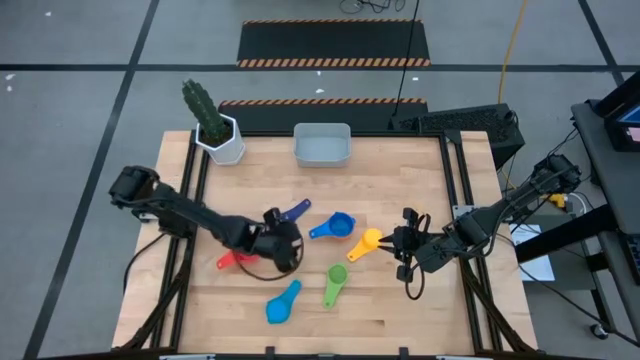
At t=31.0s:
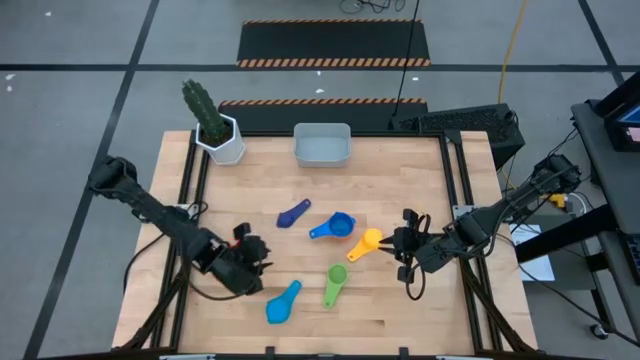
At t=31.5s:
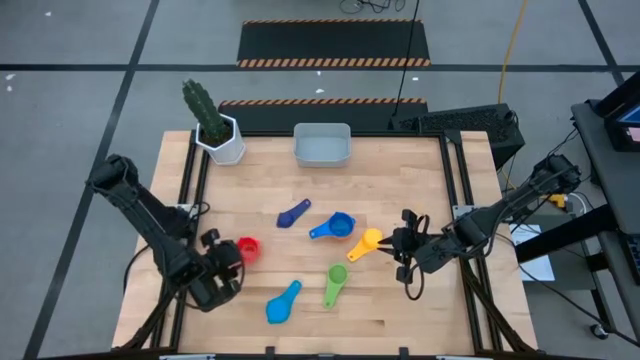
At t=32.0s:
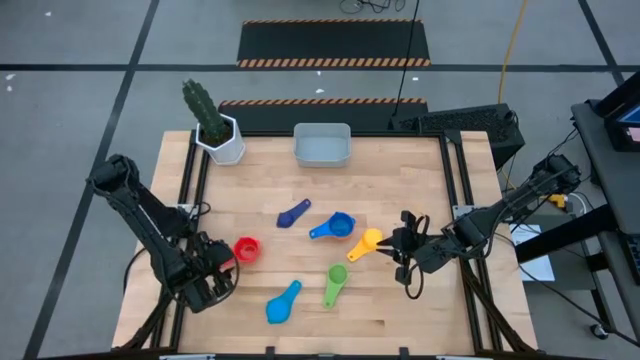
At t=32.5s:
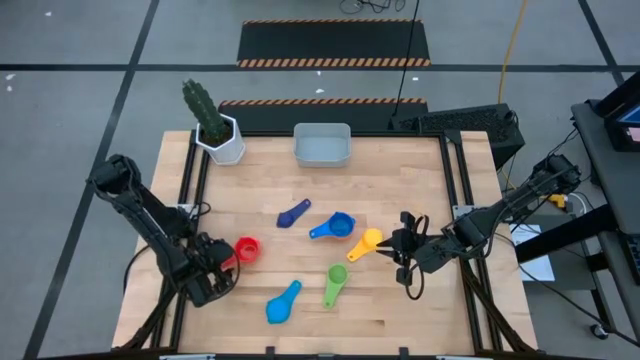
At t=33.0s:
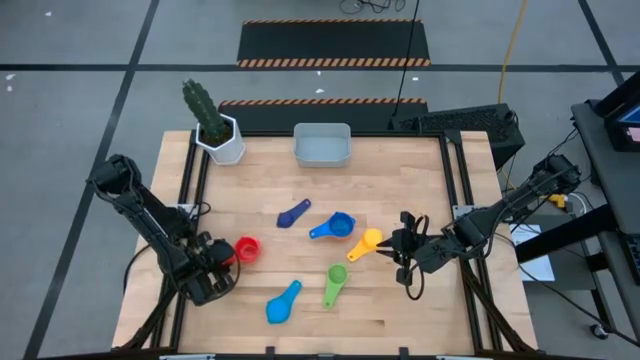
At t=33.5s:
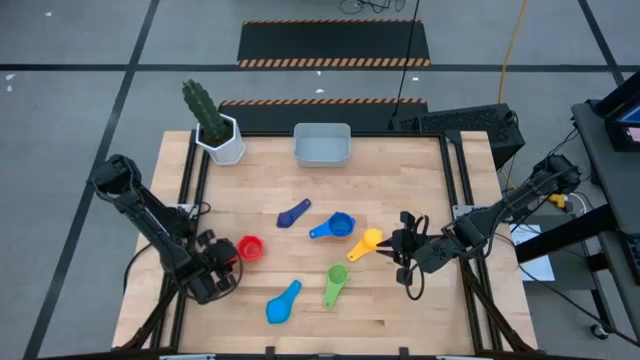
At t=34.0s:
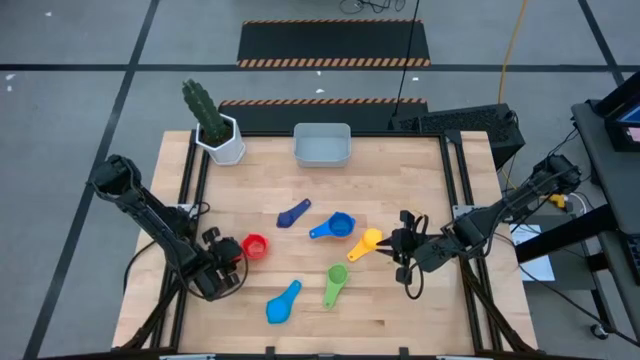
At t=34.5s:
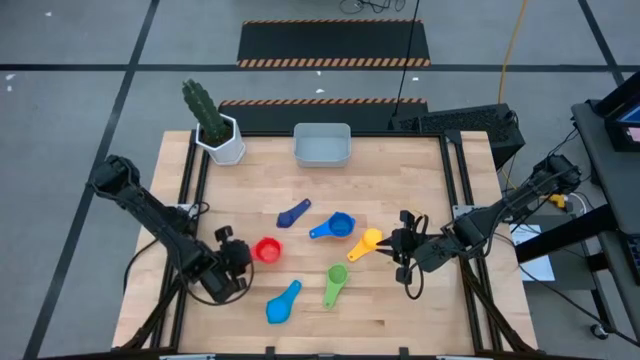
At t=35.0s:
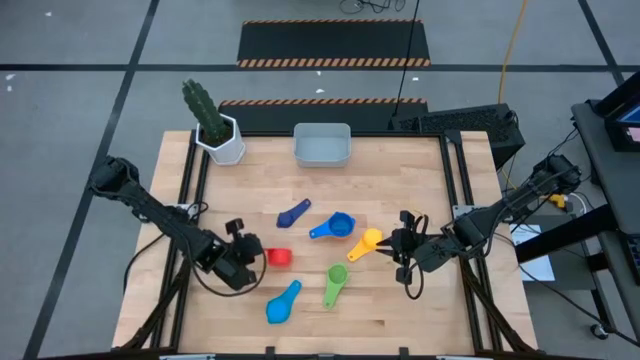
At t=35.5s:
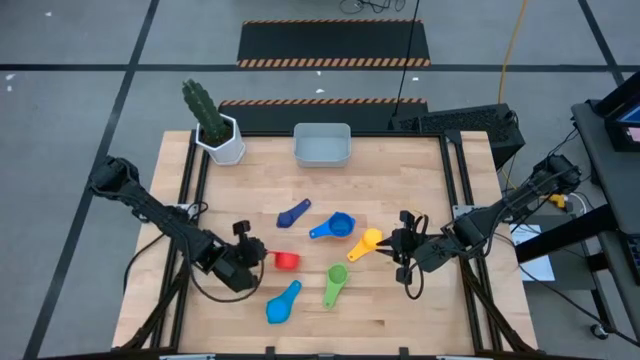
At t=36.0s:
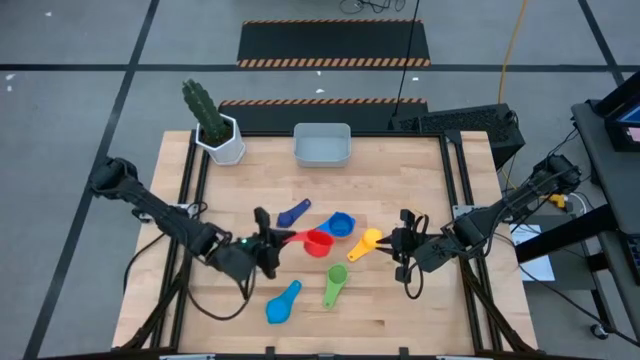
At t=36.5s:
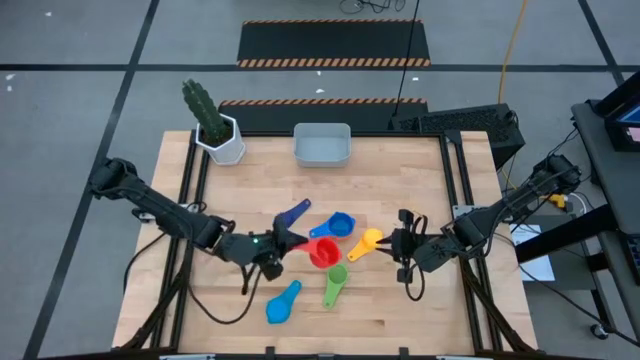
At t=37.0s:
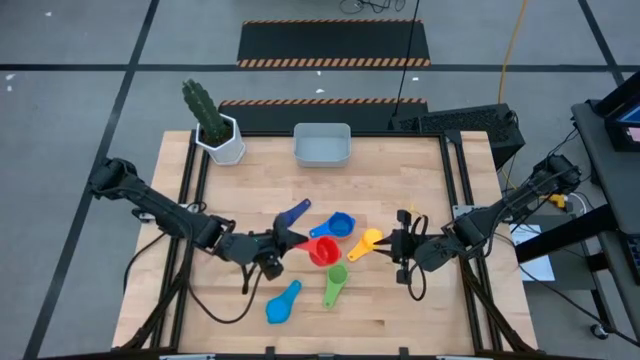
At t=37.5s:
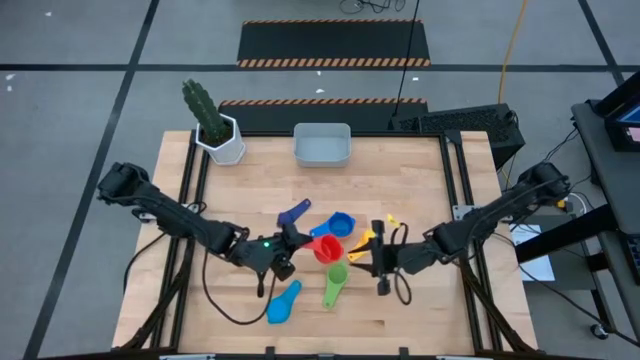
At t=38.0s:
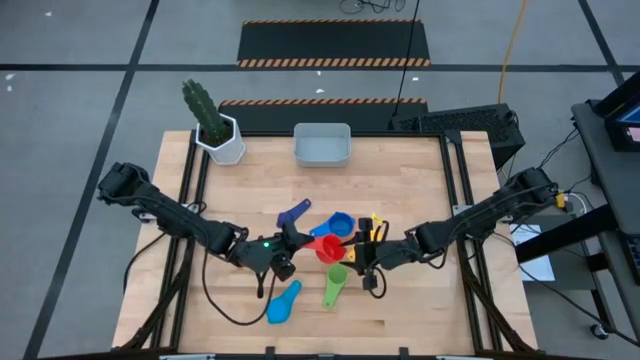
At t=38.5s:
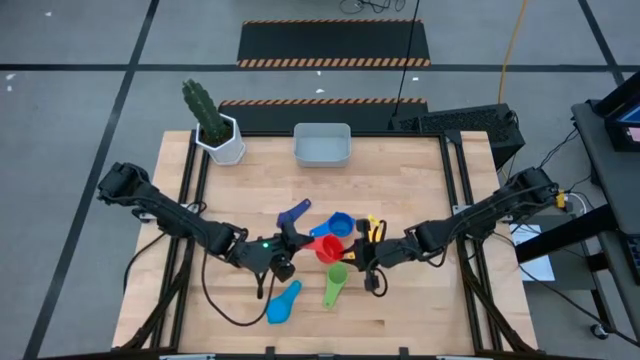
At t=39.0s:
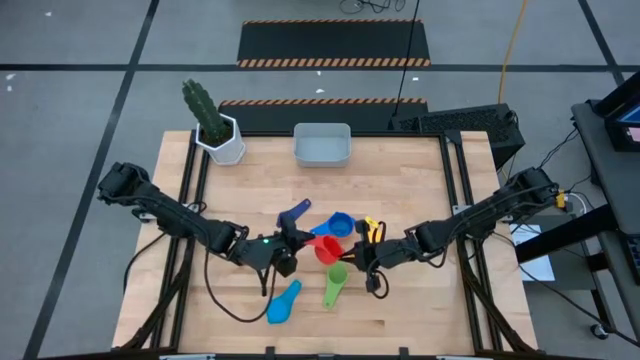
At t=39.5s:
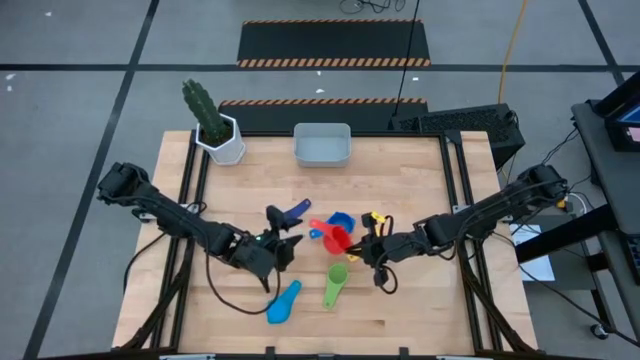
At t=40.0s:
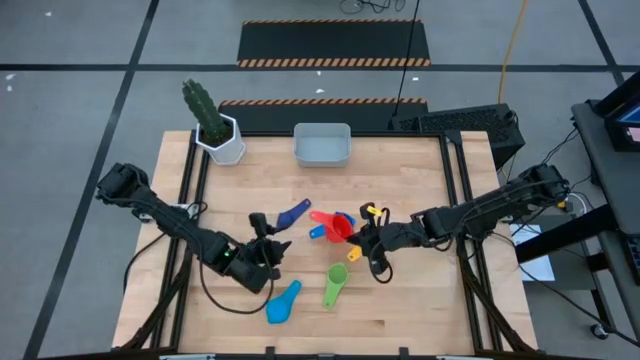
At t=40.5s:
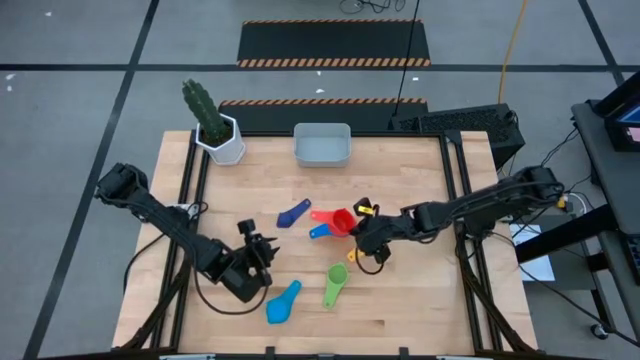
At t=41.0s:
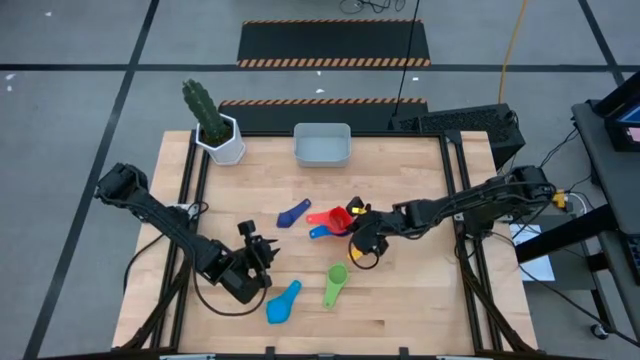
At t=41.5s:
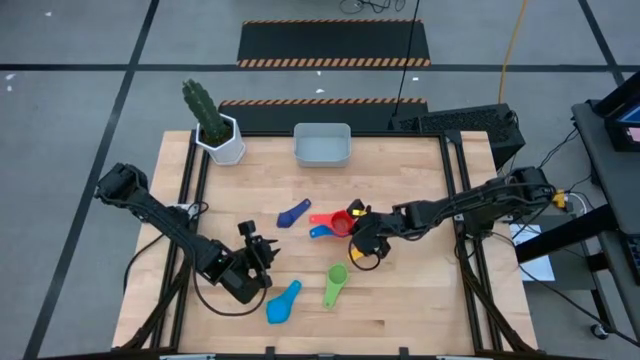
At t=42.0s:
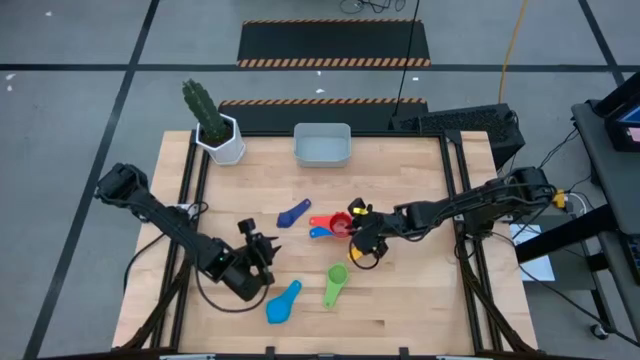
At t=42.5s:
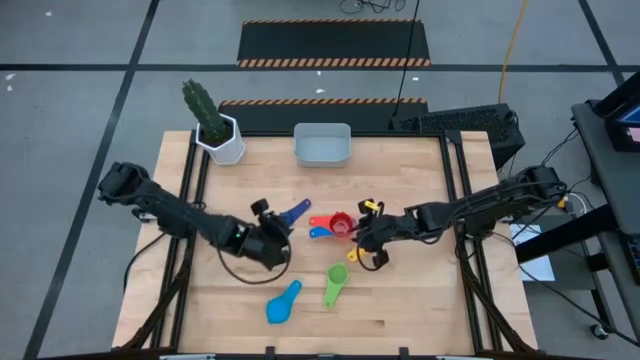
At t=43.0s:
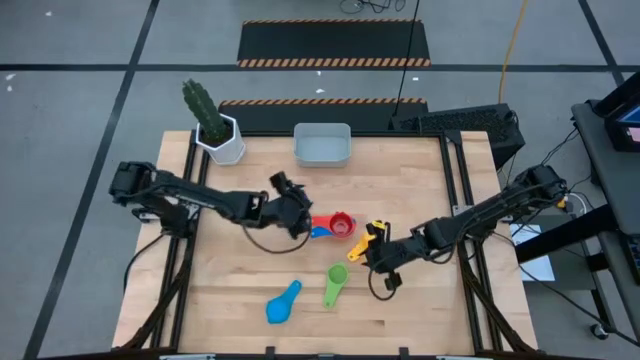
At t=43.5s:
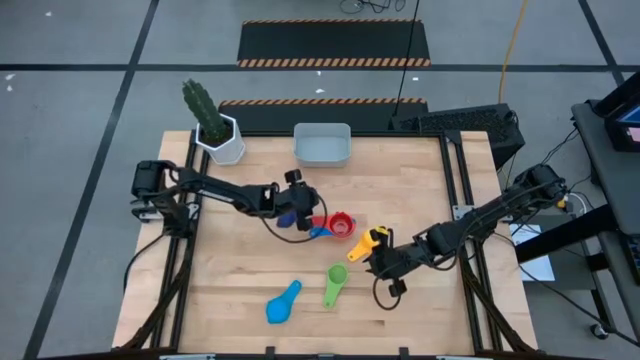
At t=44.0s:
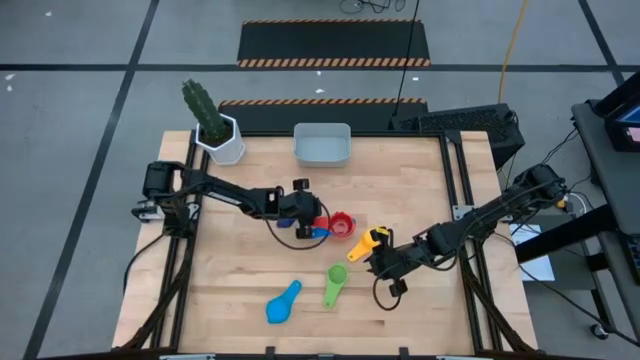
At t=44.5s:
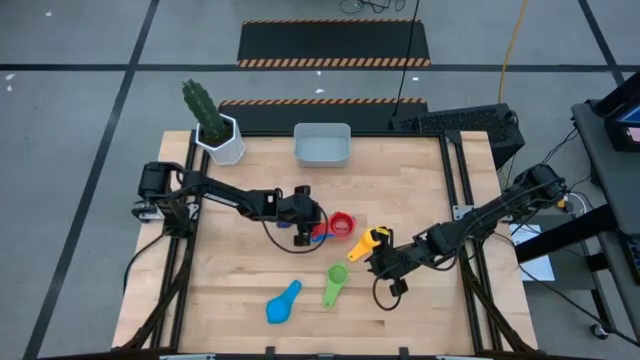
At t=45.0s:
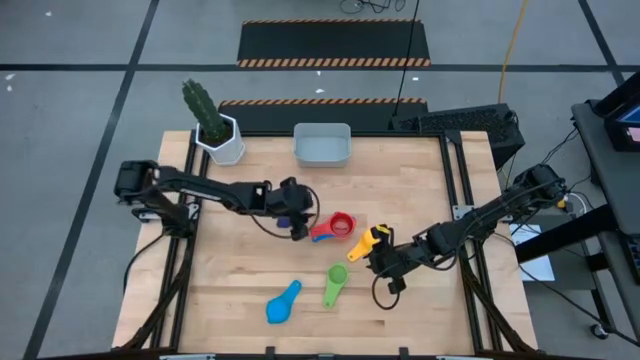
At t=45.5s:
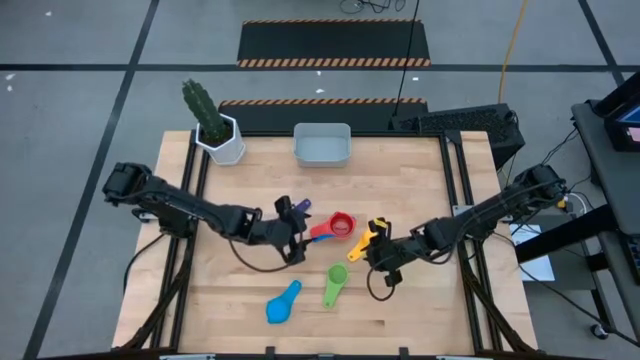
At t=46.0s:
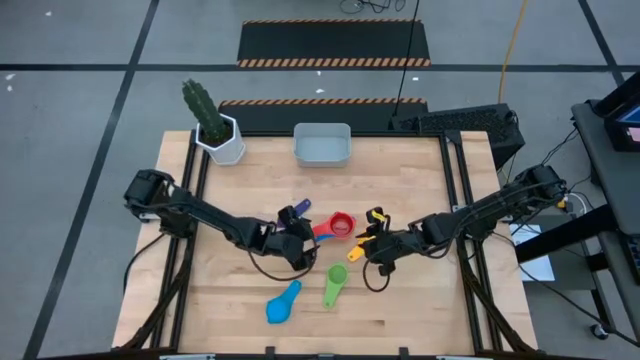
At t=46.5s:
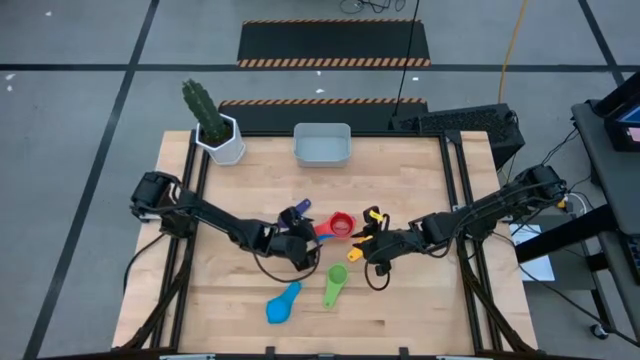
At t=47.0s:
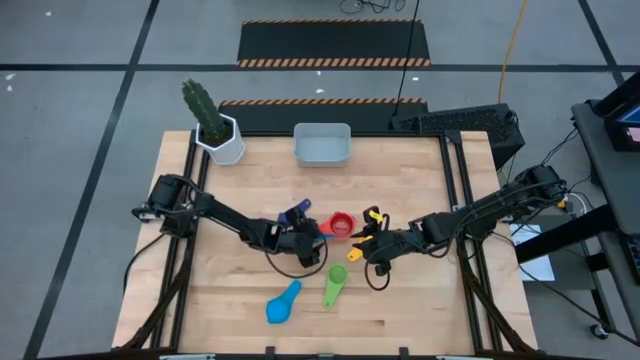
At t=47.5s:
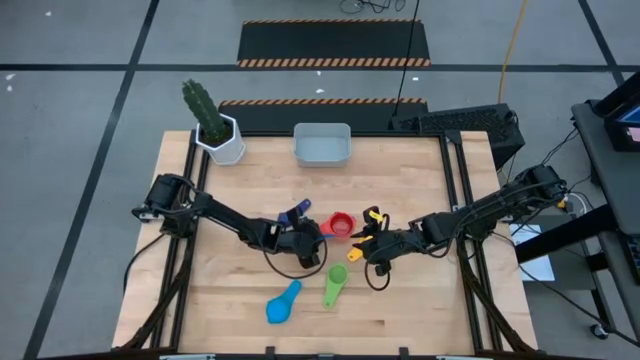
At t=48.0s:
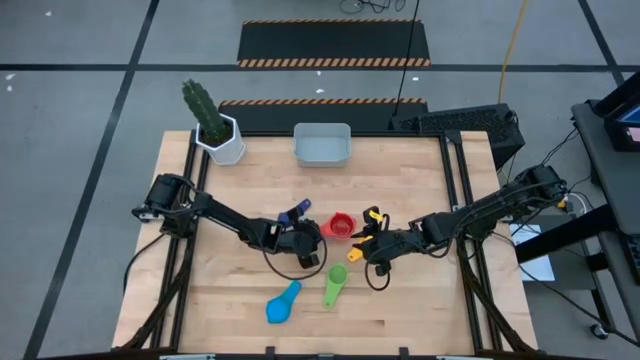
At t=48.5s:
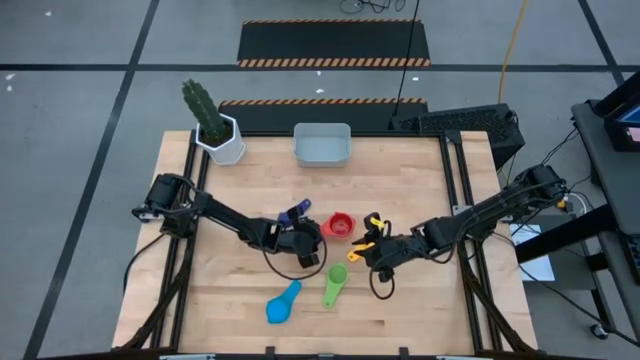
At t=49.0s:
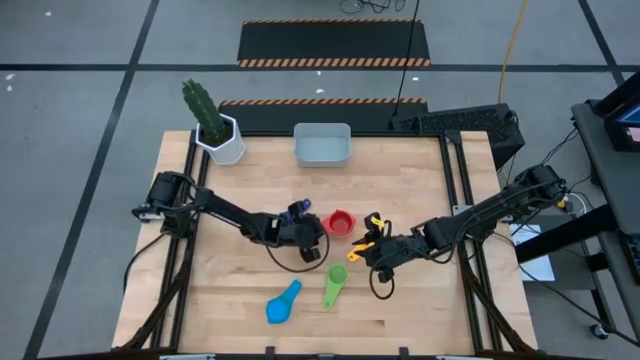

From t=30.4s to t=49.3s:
Task: Nest measuring cups in basket
Stack the red measuring cup on top of the blue measuring cup

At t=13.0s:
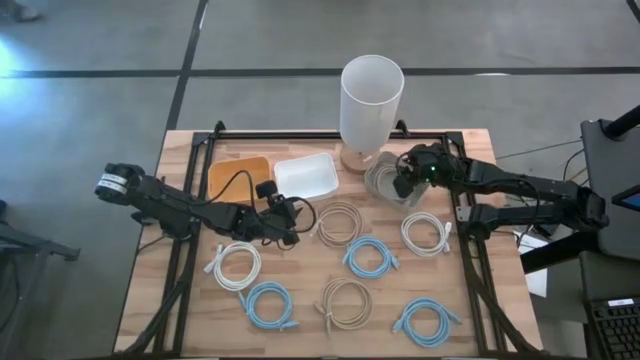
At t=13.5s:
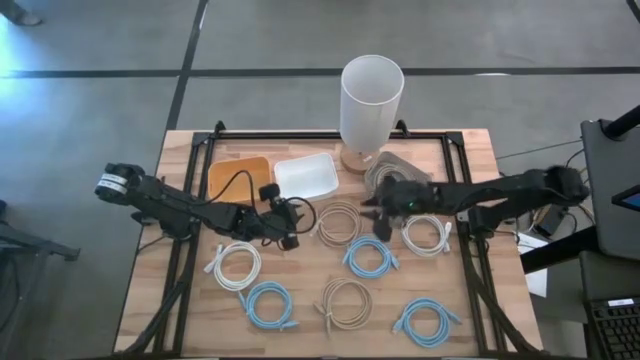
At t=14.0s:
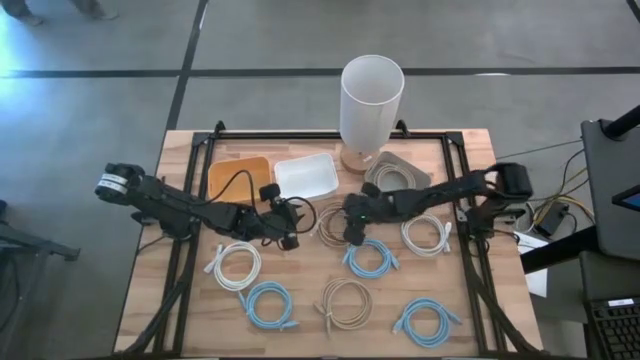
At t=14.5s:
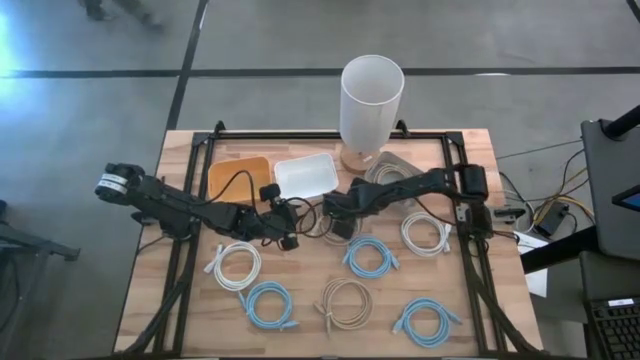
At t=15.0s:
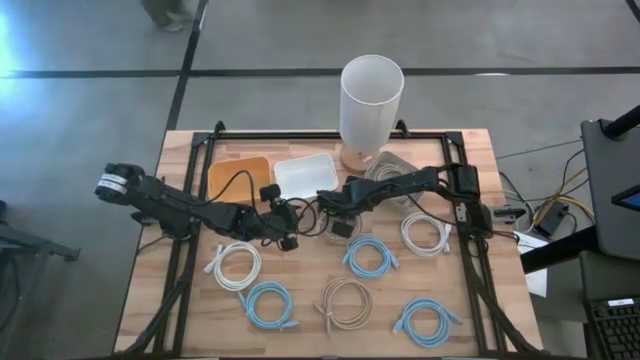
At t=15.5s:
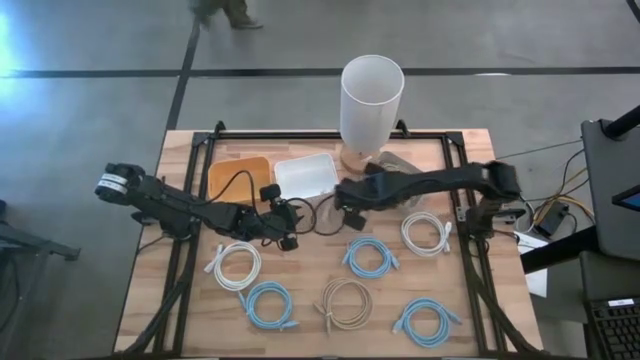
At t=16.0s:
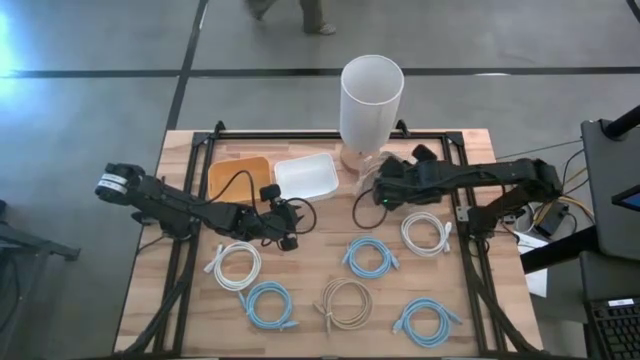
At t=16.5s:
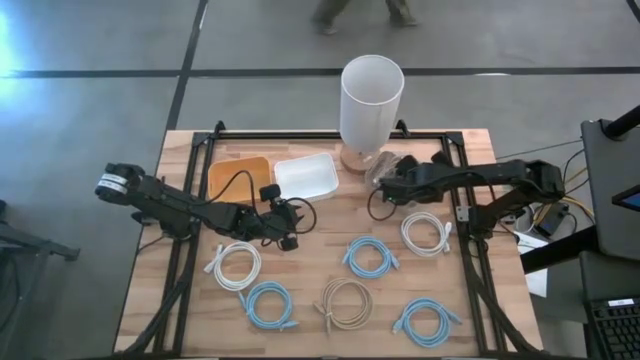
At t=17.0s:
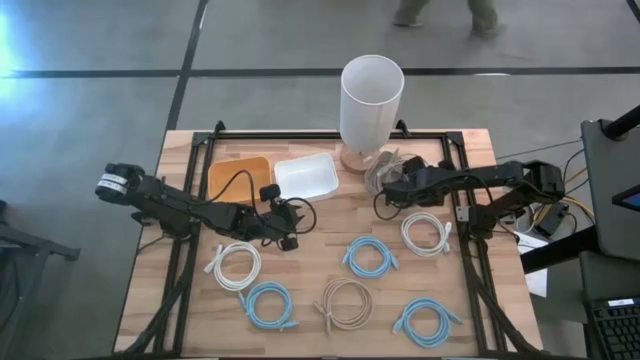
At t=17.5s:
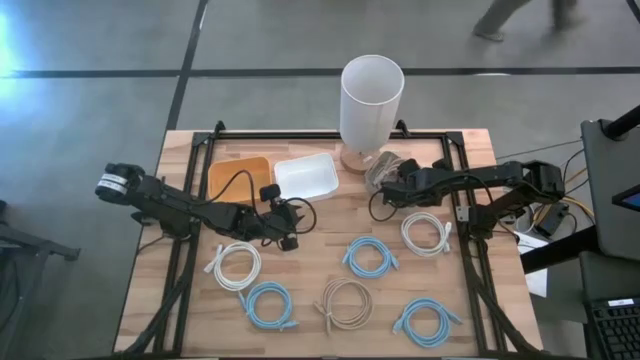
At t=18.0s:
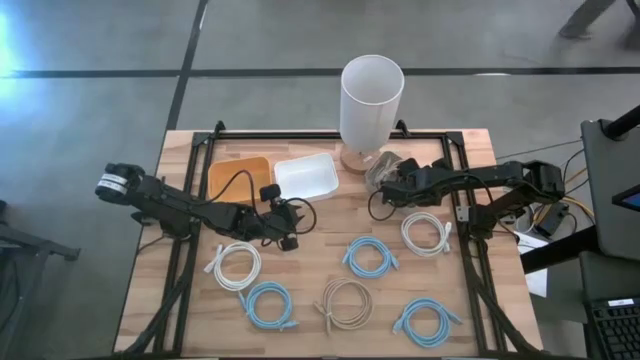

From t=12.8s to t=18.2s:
Task: Pick & Place USB Port
Put the top brown USB cable into the gray bin
